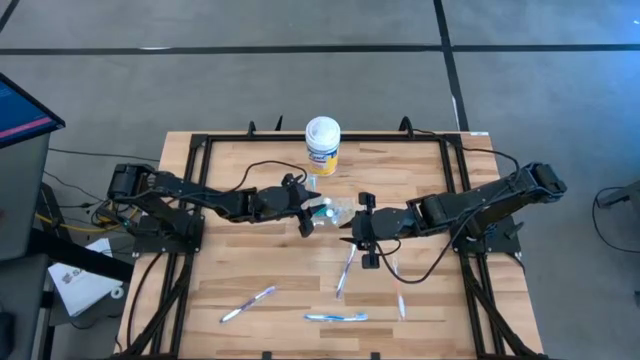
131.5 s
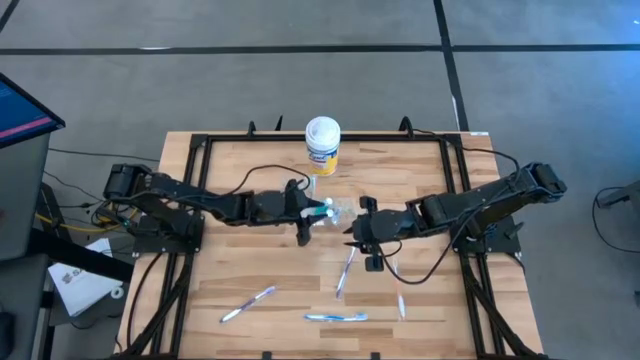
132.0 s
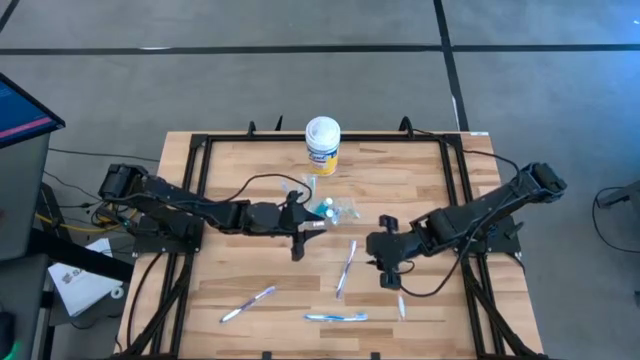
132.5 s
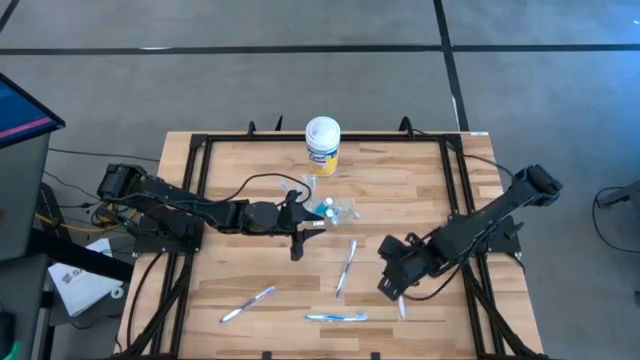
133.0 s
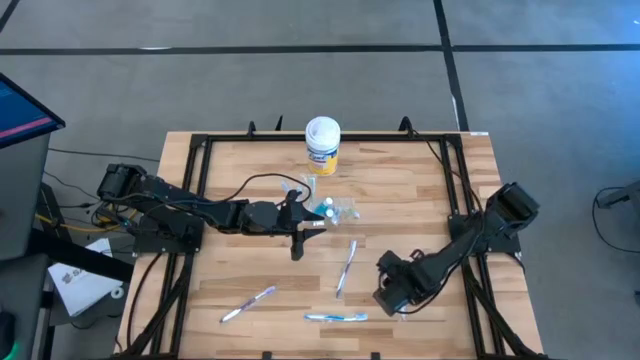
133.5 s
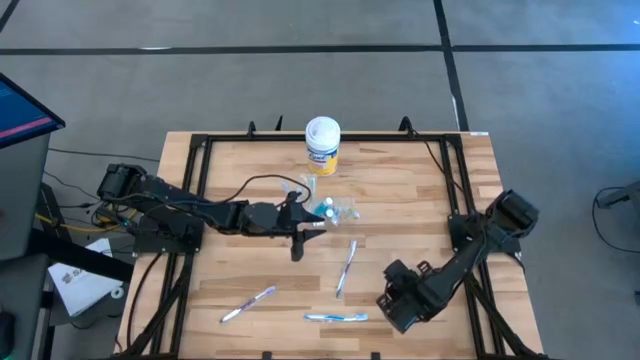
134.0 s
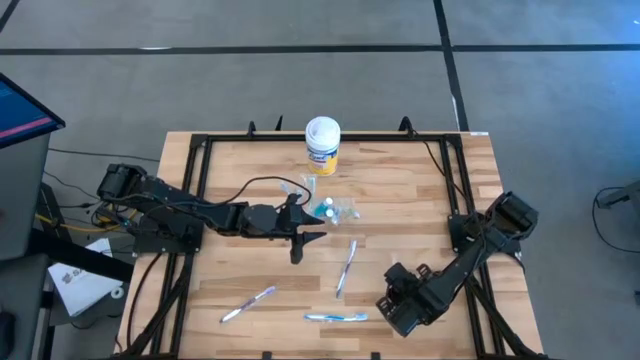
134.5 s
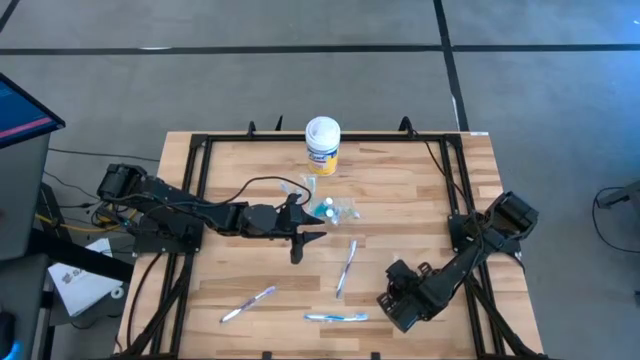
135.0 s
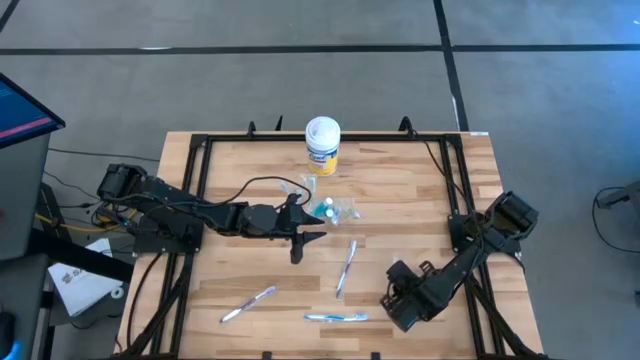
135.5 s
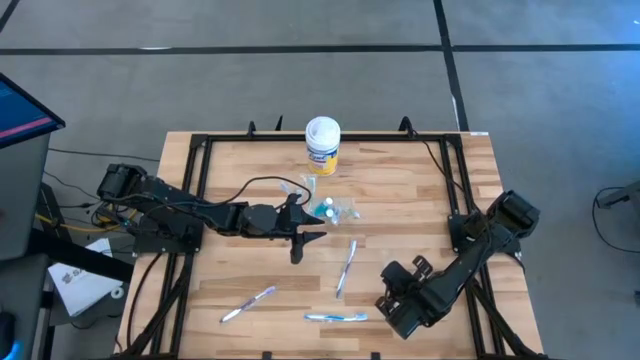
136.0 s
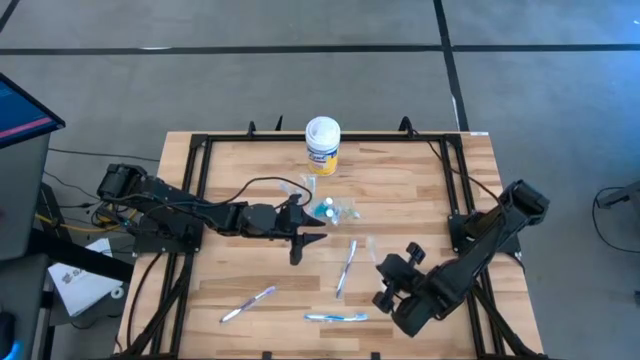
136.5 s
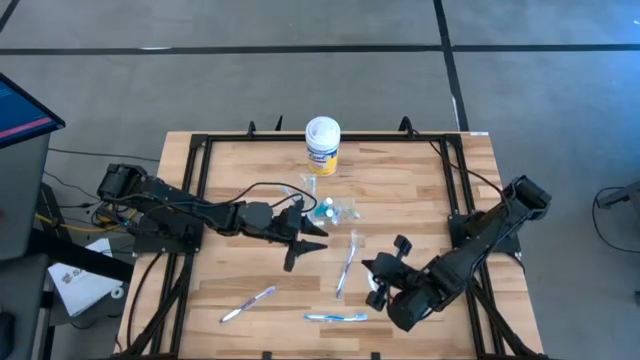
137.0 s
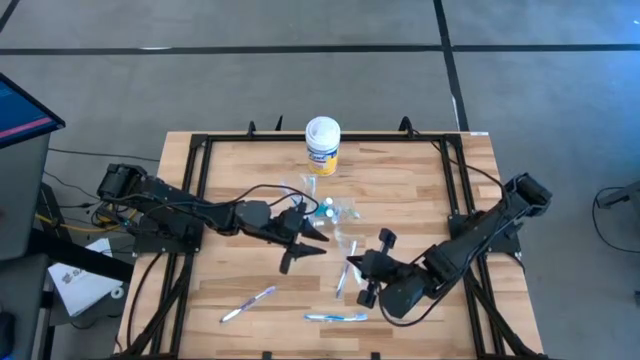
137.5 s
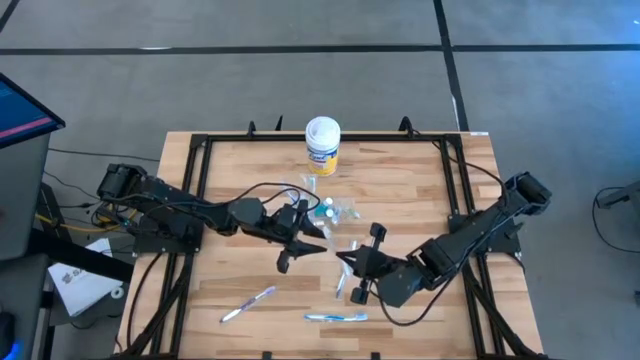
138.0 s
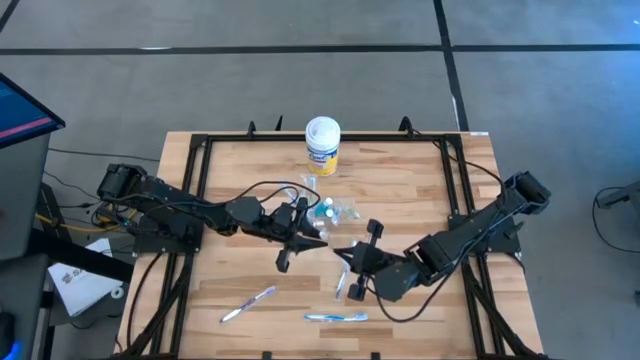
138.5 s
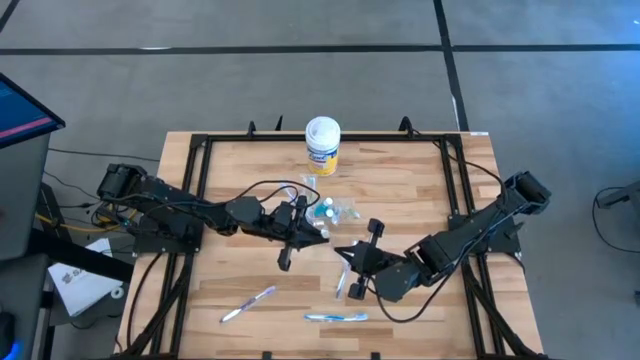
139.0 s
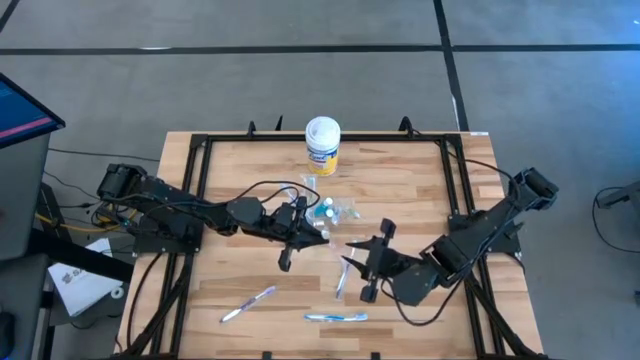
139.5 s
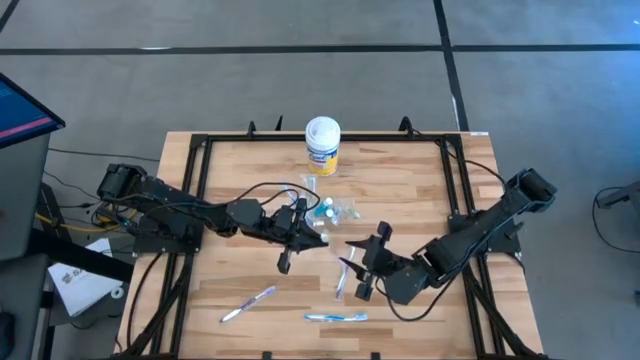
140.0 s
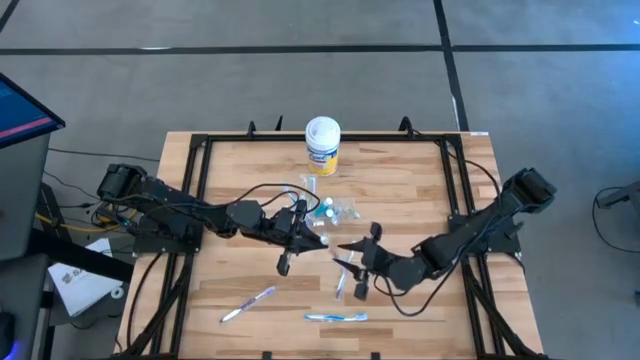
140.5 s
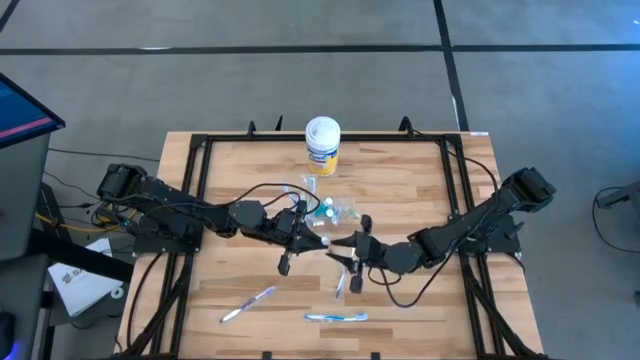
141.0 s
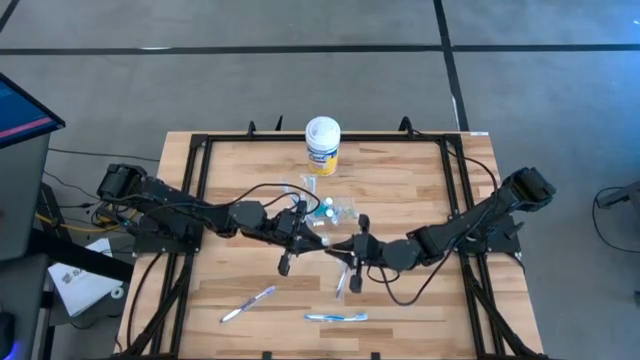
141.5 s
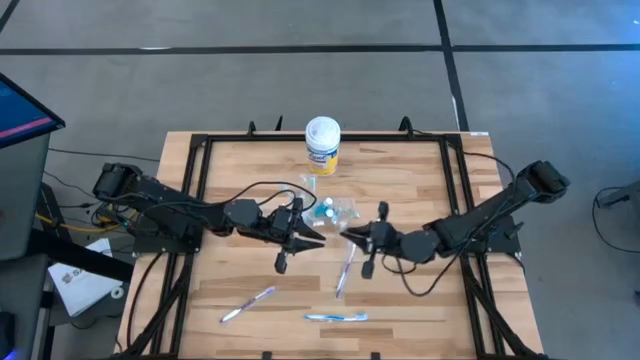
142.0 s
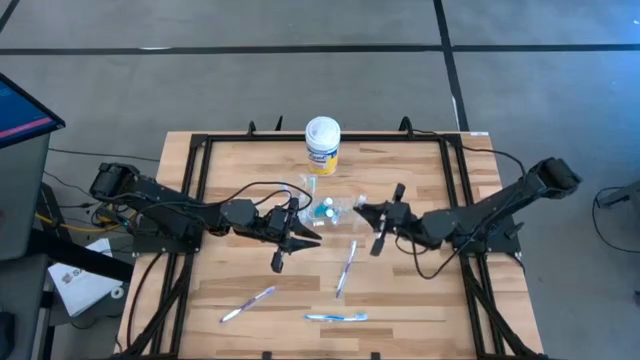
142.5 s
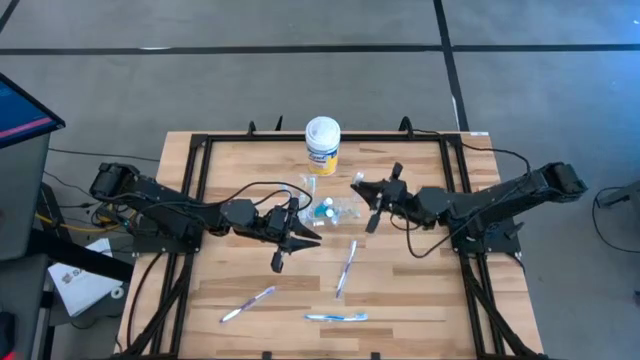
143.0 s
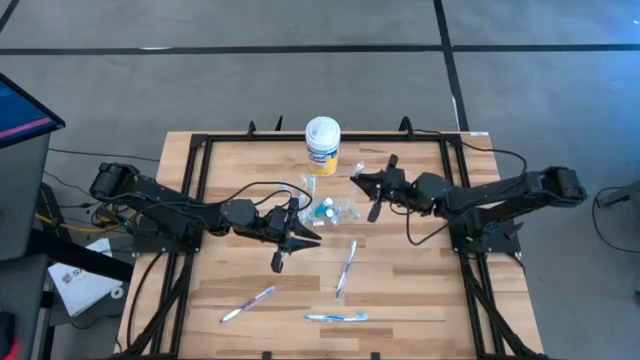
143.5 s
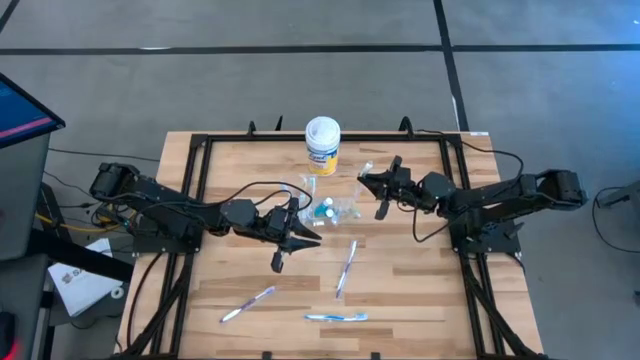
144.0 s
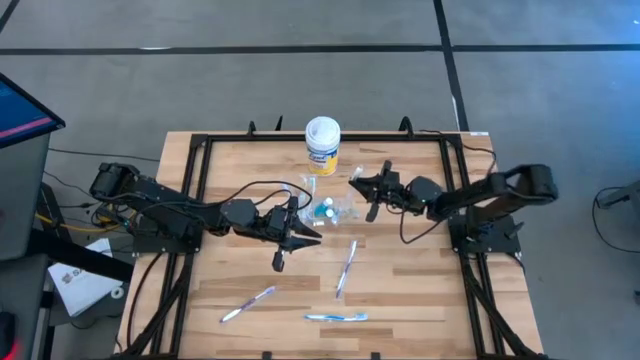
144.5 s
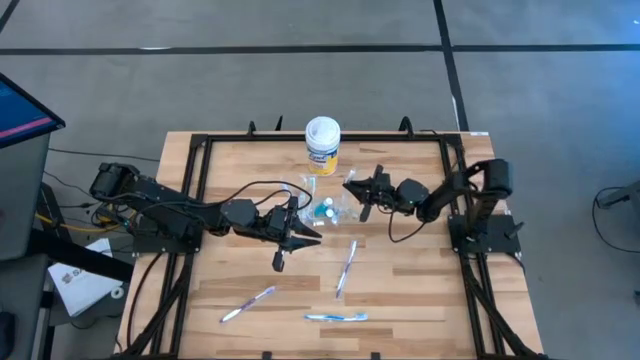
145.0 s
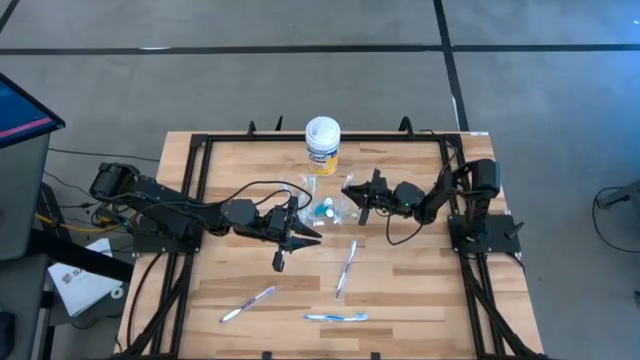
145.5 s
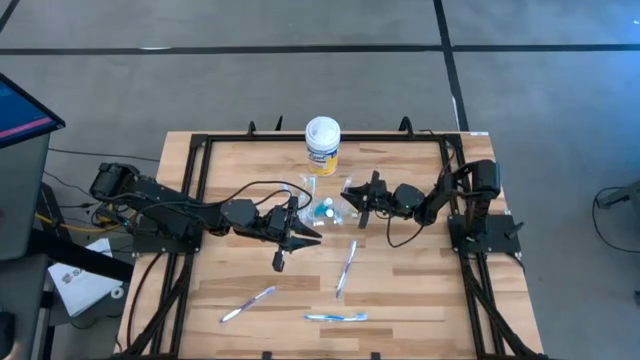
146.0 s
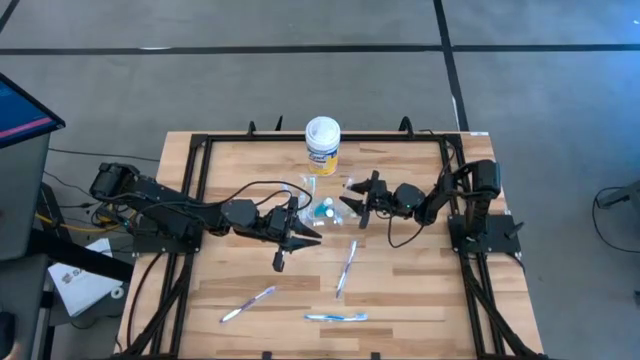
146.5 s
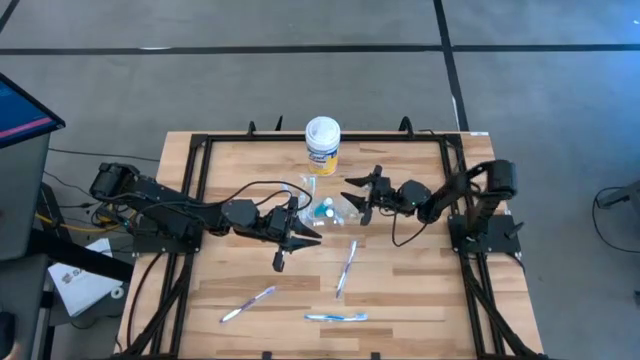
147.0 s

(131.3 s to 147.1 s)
Task: Pick & Place toothbrushing station
Put the orange toothbrush into the transparent organizer

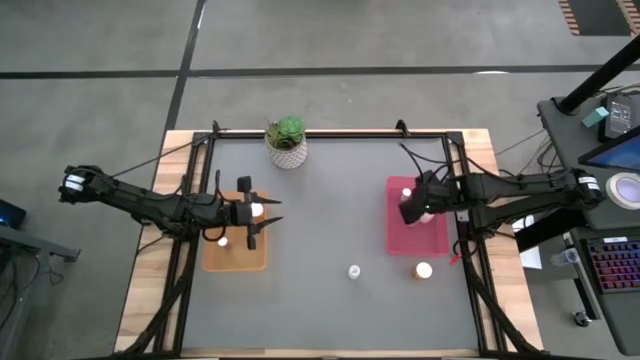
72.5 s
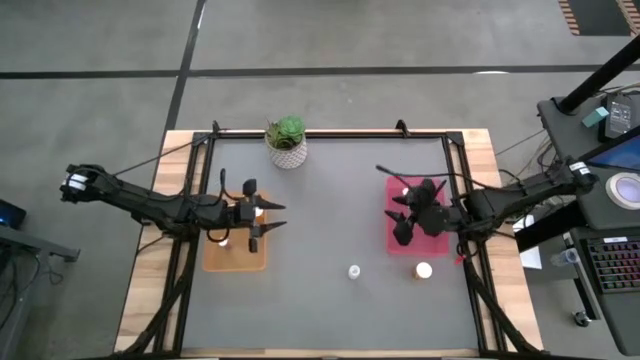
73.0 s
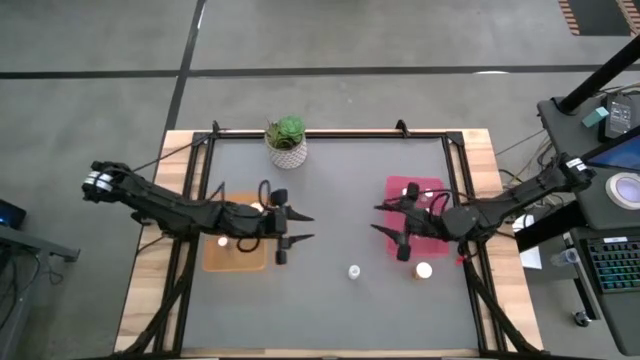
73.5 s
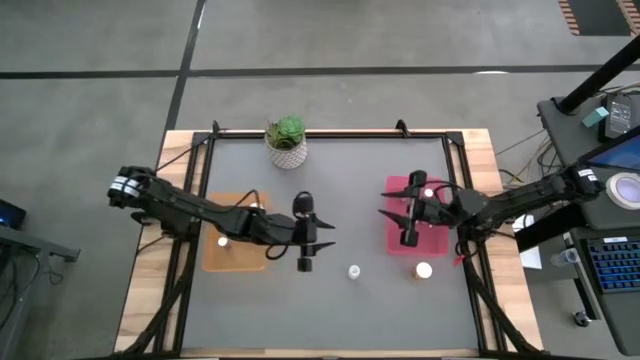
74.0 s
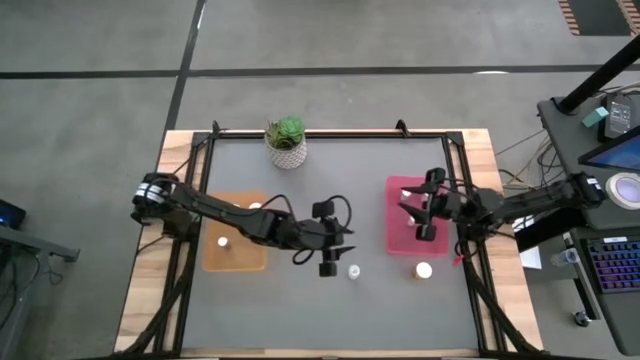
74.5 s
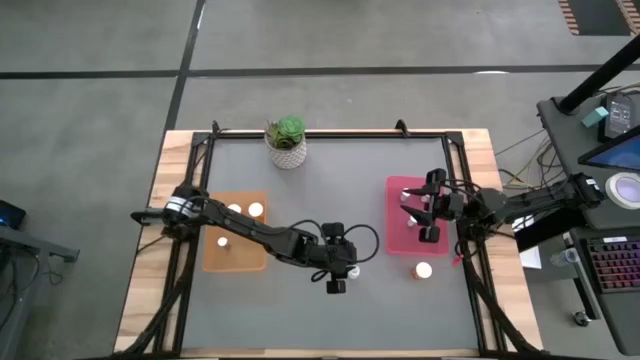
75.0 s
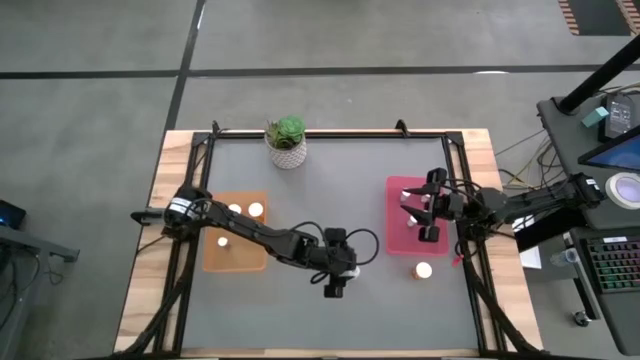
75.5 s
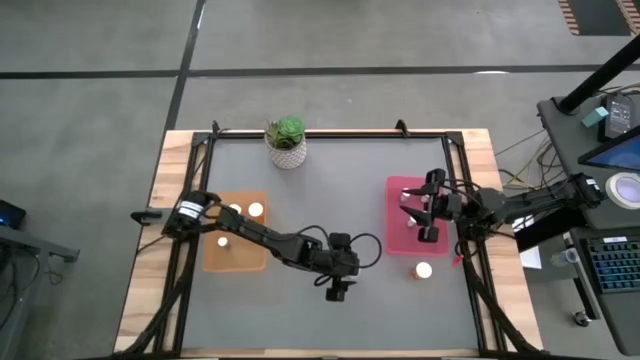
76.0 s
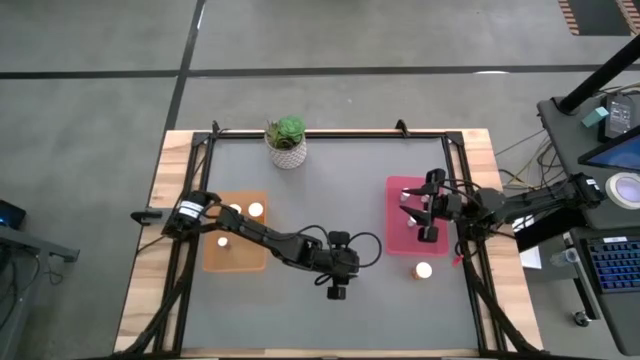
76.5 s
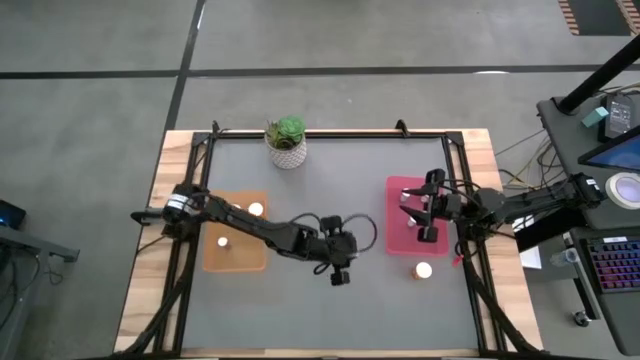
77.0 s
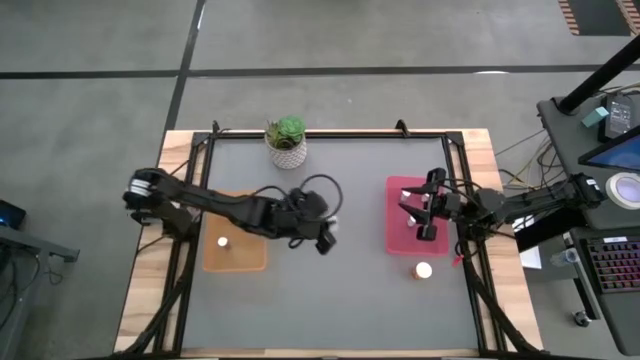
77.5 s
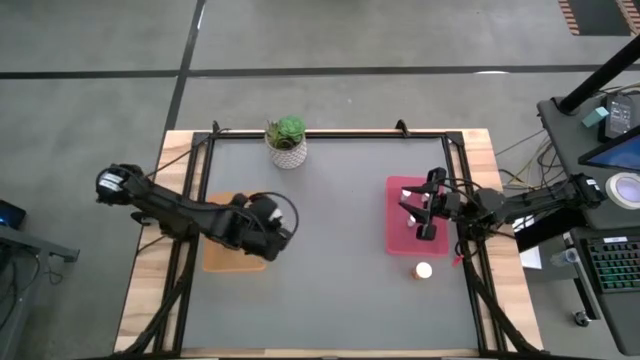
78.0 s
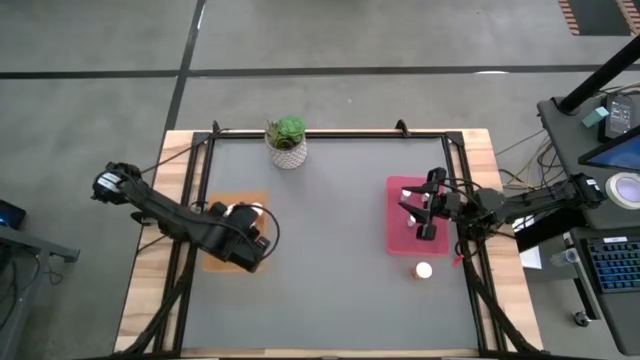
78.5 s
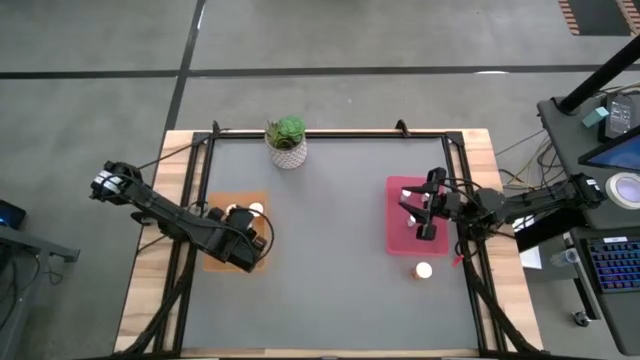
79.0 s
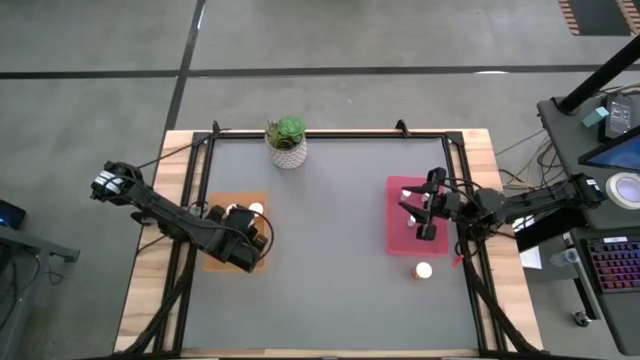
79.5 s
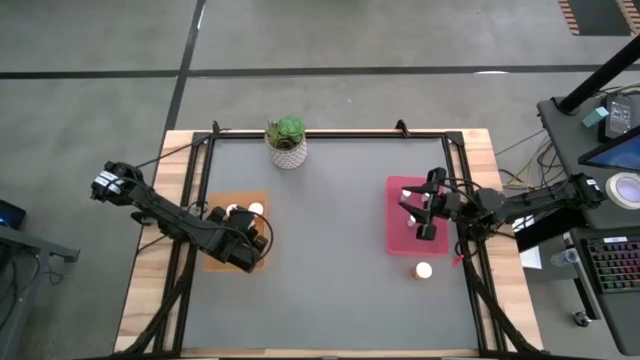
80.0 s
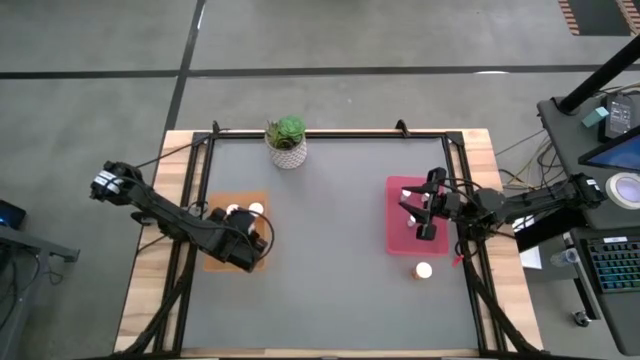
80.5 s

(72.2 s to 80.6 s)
Task: Pick and place medicine bottles into bin by pill shape (circle, oval)
Put the white capsule bottle into the pink bin
